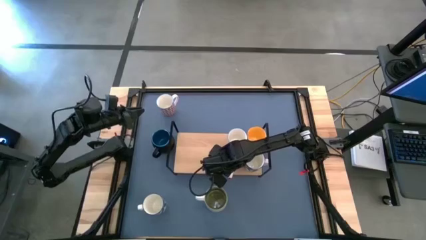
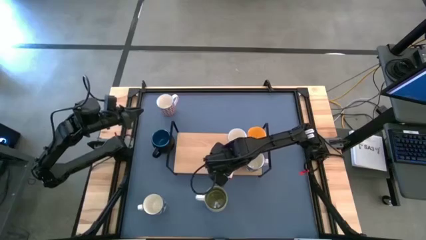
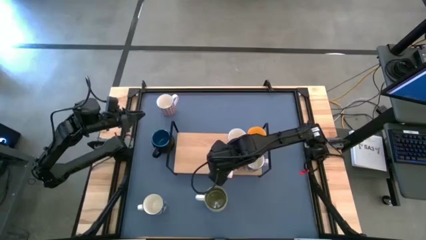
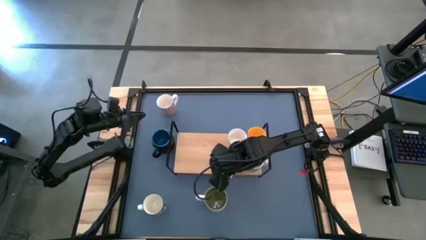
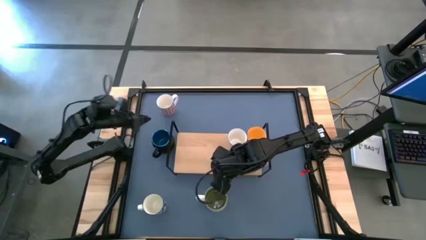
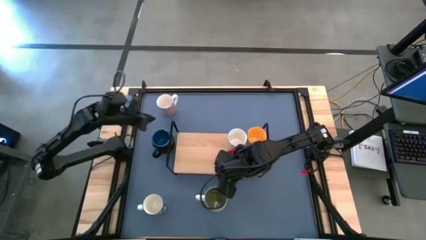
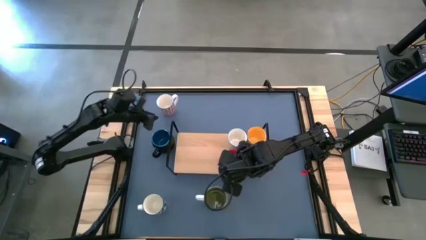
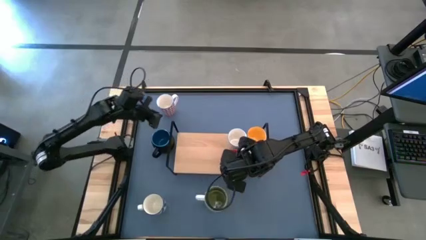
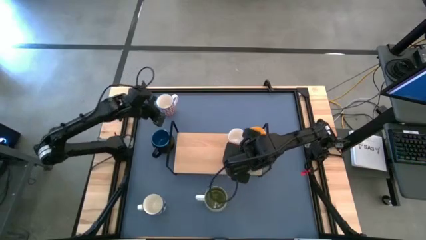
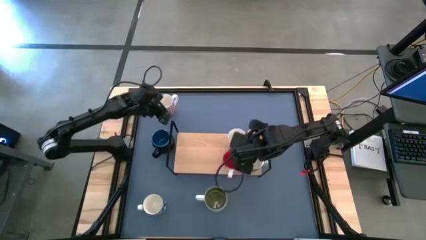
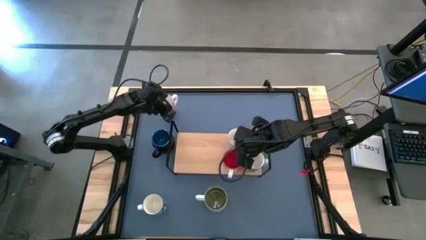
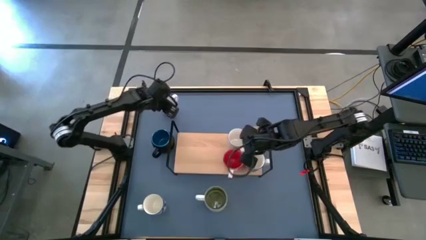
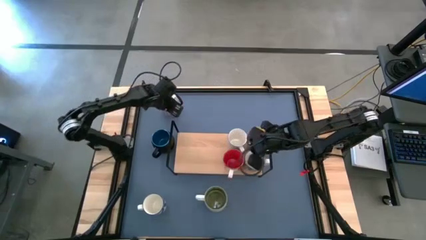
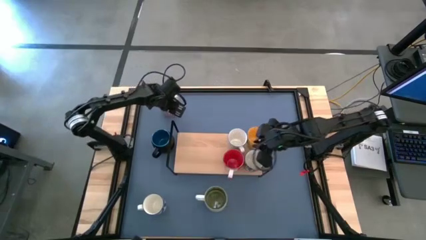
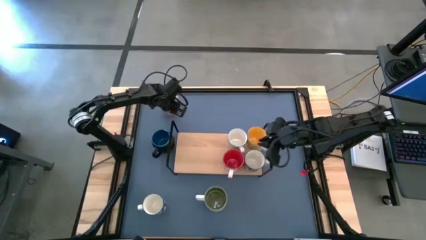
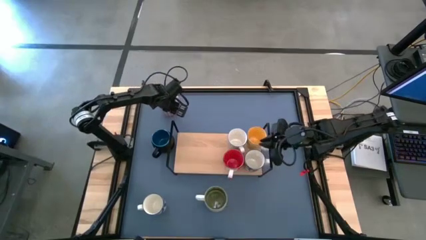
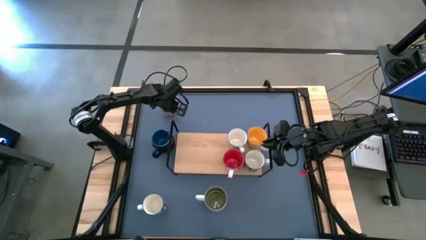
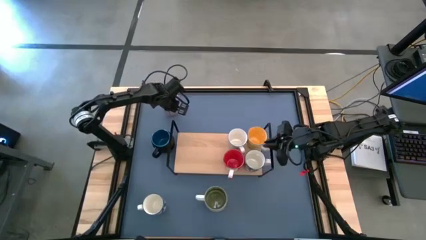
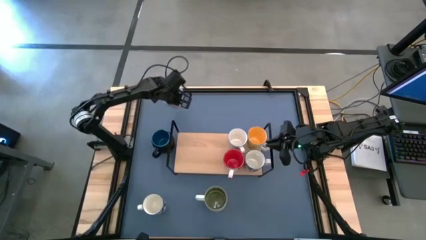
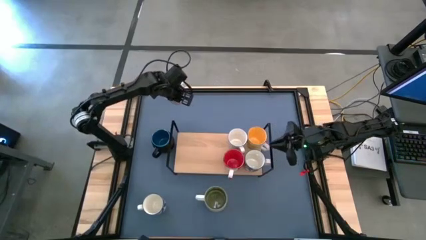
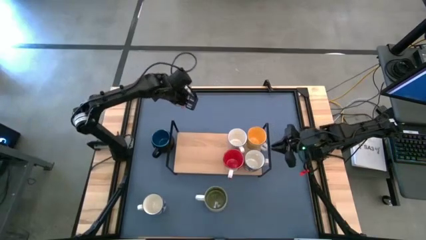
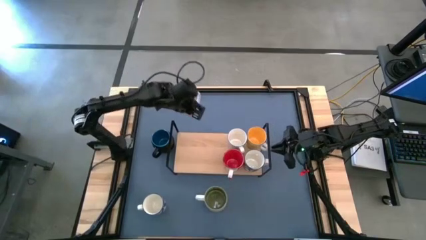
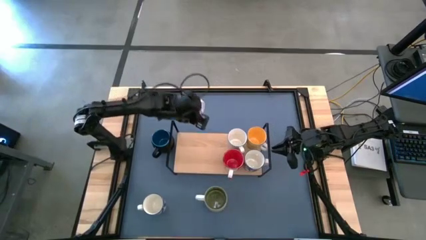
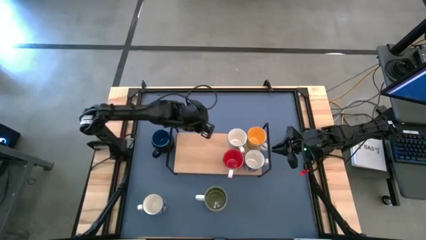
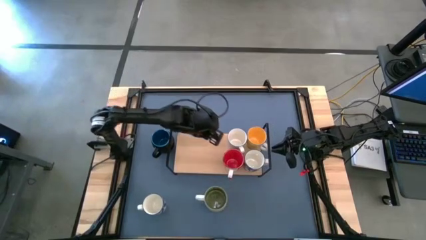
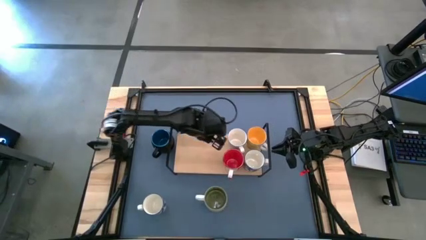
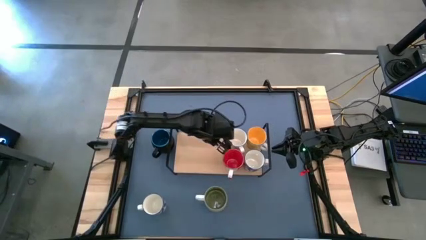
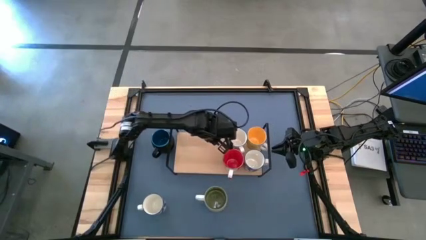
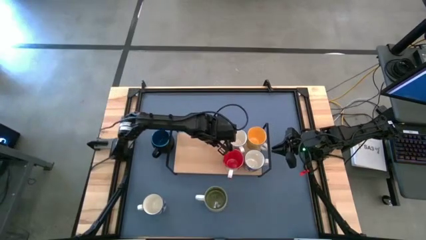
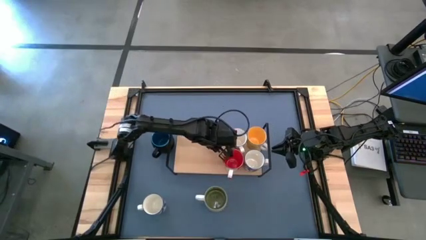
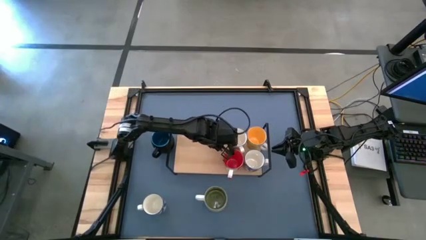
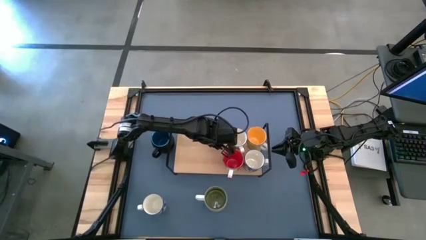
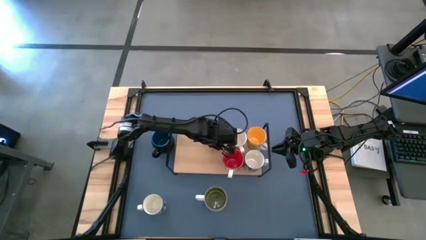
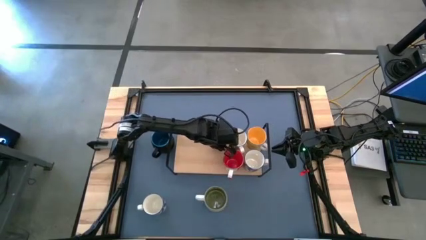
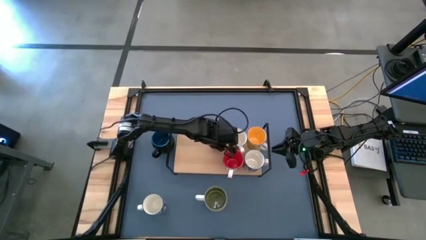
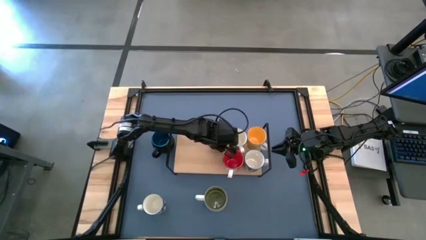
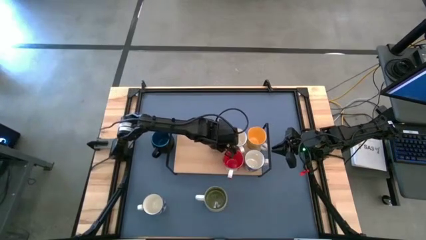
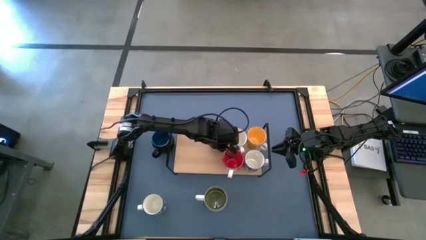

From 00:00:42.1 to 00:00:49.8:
Task: Place coffee mugs
Put the light blue mug on the shelf

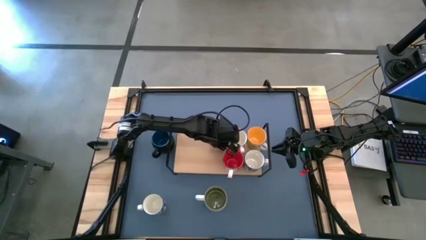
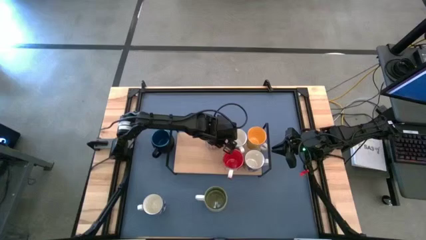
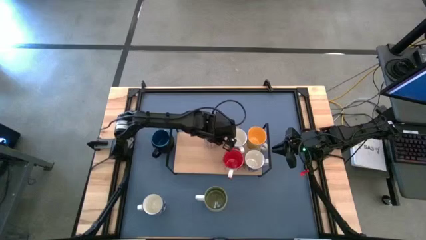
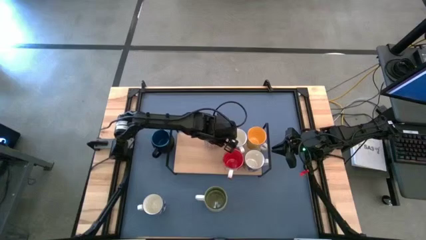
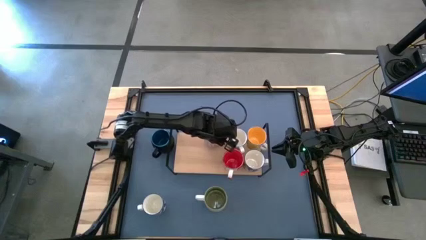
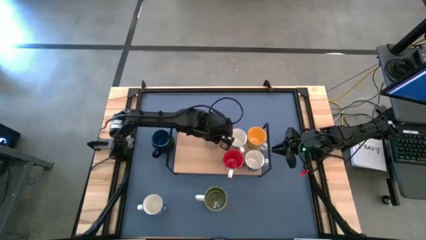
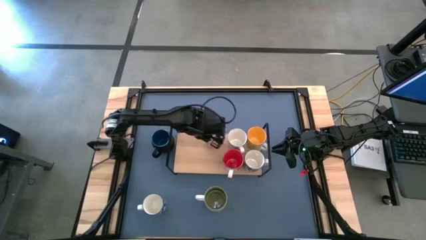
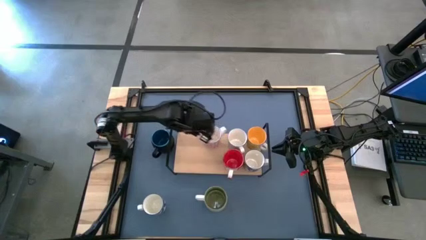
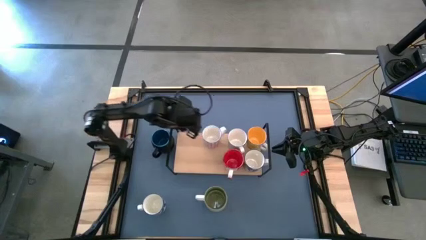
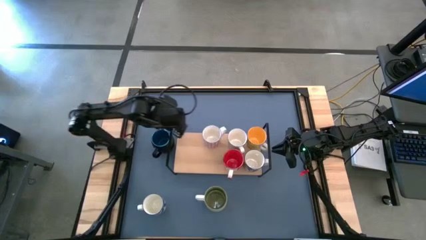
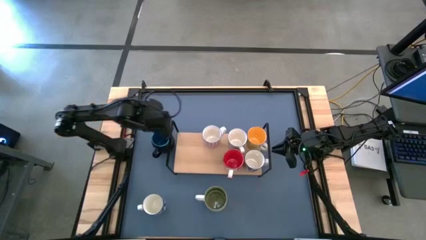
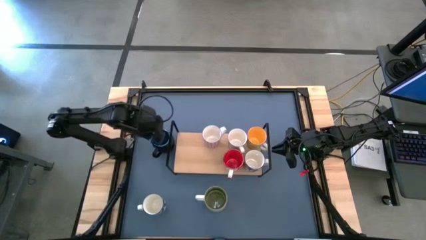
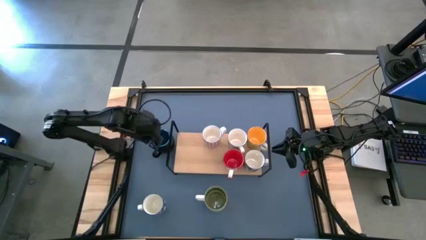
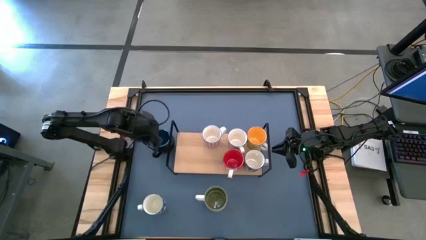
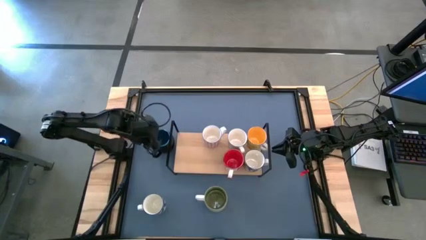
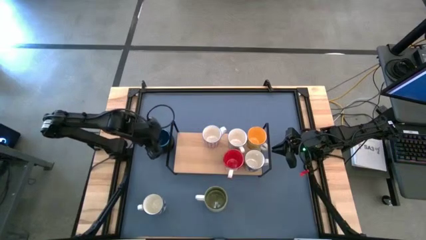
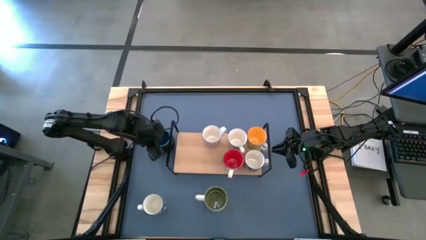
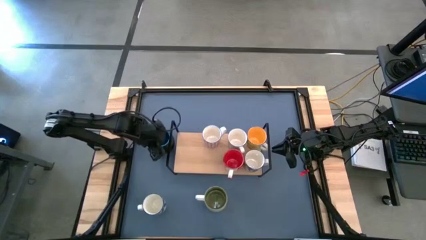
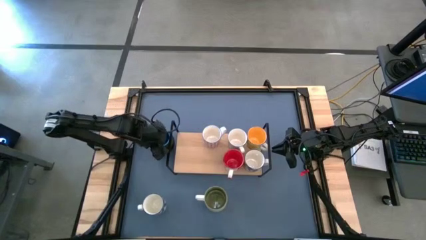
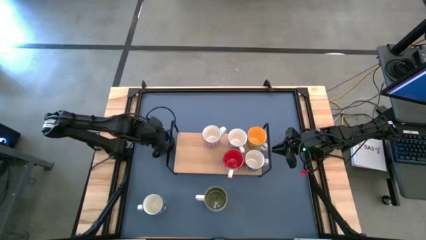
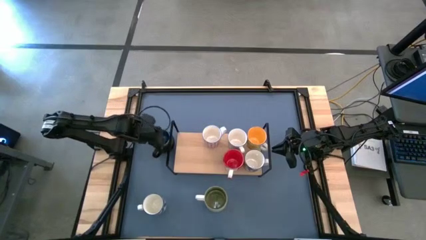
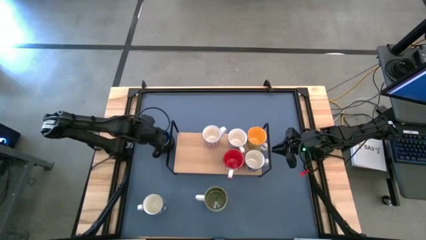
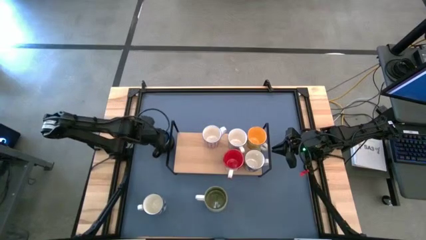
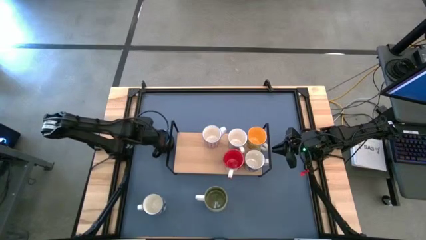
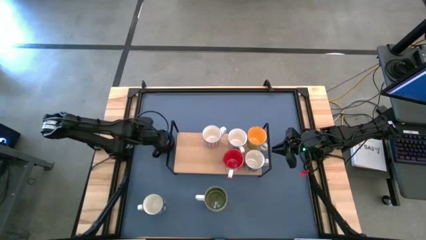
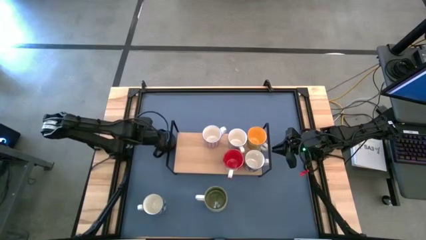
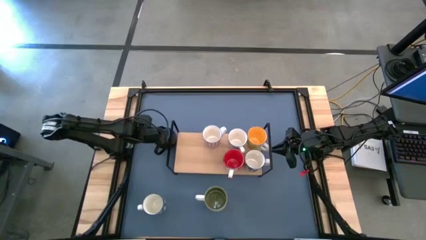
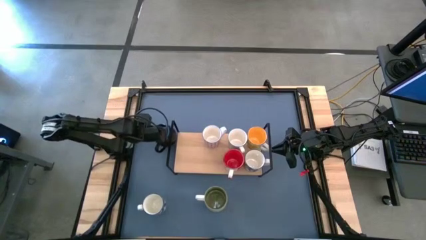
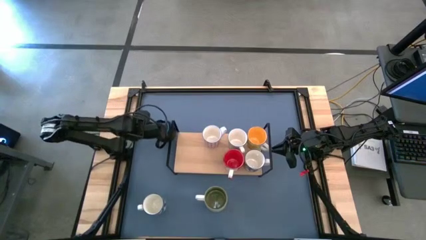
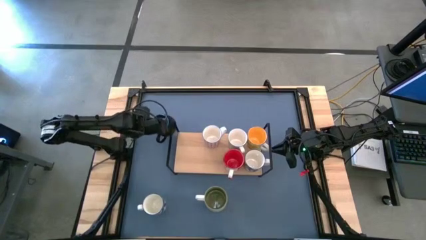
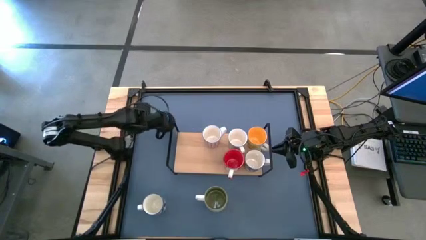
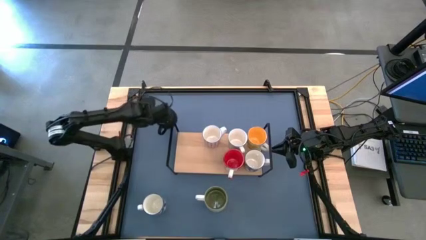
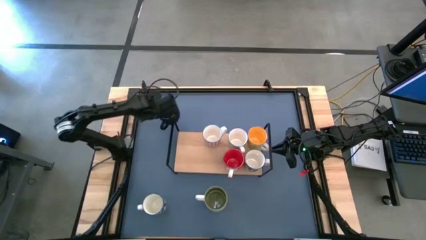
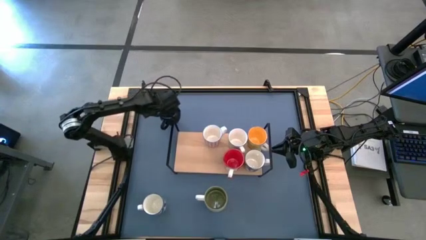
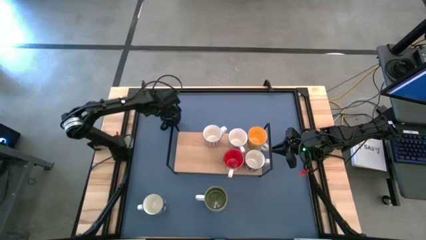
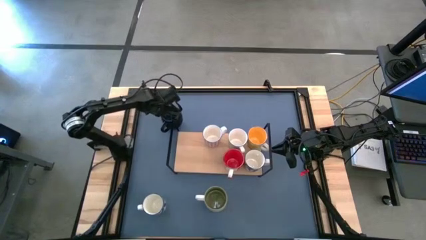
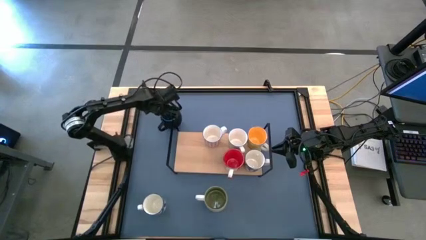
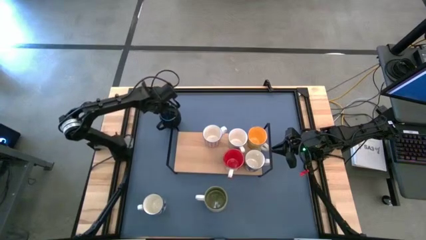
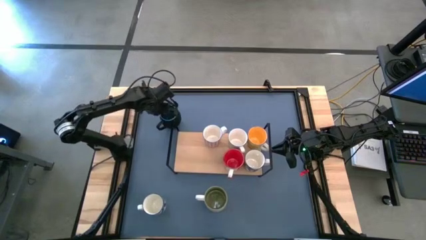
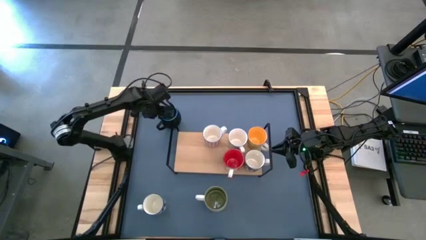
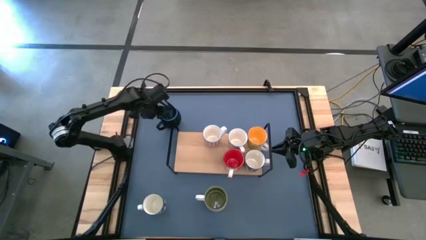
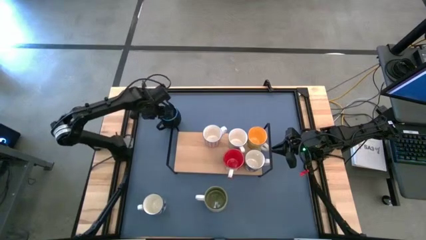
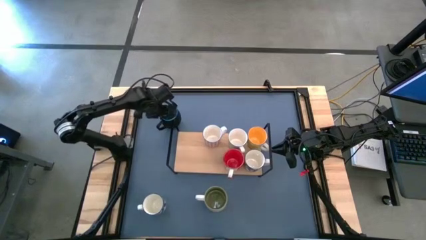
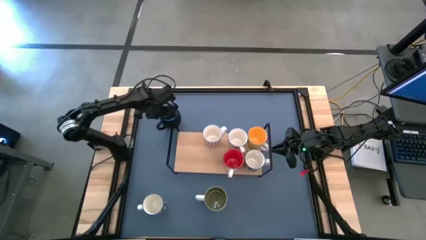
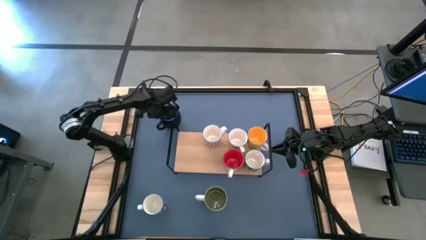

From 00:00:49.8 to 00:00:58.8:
Put the black mug on the shelf
